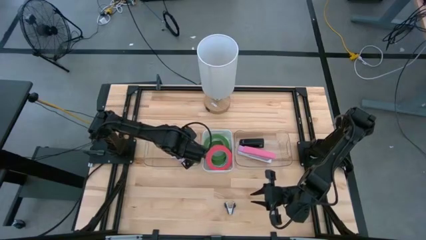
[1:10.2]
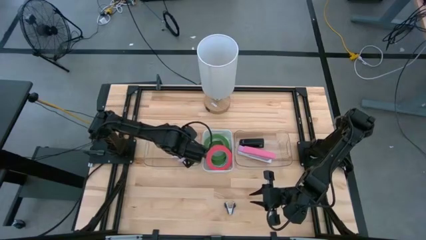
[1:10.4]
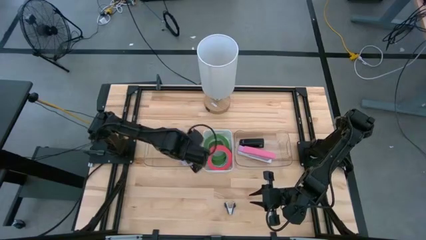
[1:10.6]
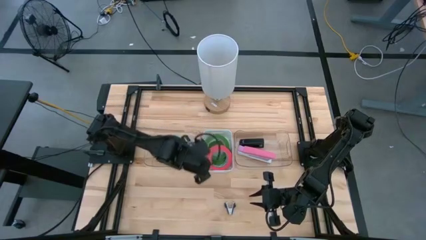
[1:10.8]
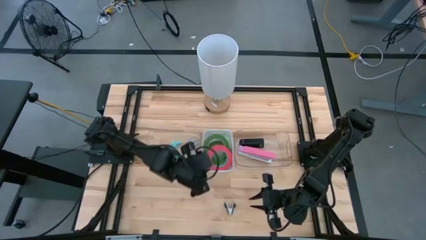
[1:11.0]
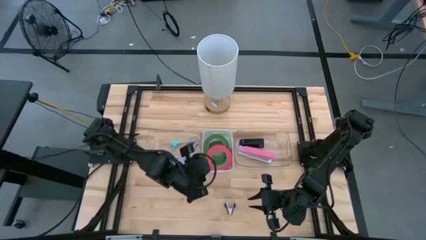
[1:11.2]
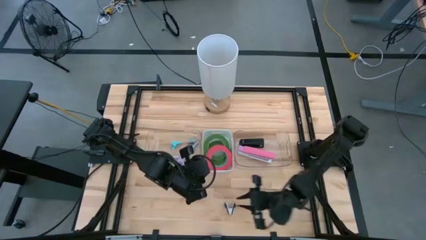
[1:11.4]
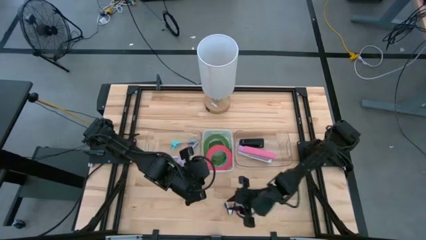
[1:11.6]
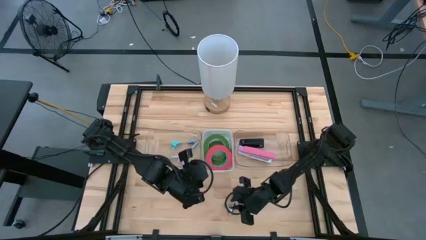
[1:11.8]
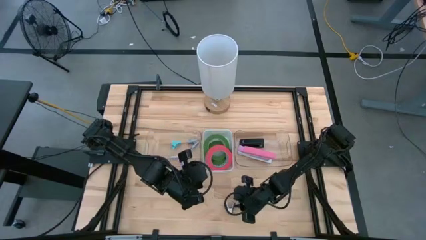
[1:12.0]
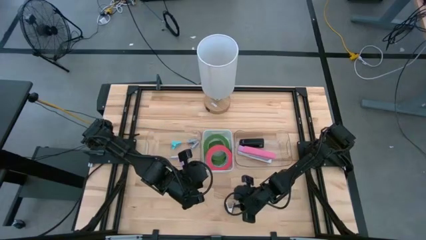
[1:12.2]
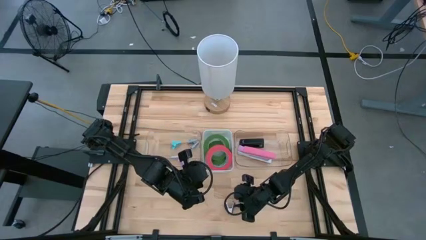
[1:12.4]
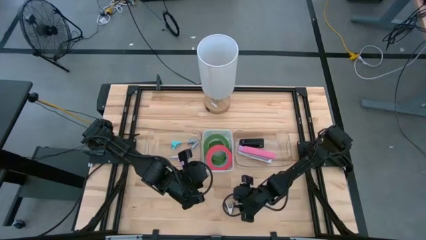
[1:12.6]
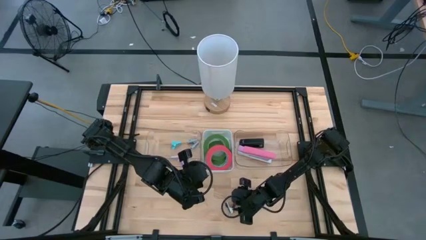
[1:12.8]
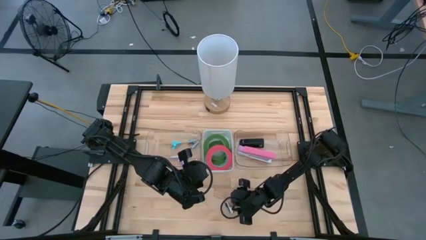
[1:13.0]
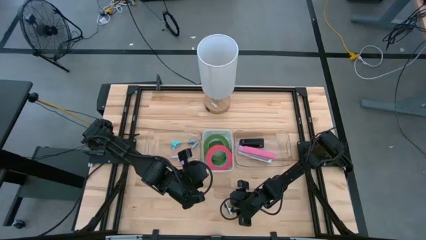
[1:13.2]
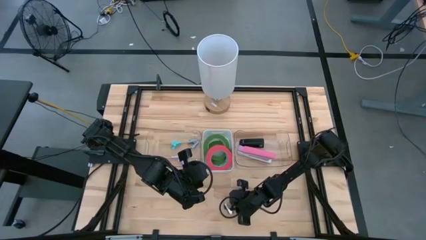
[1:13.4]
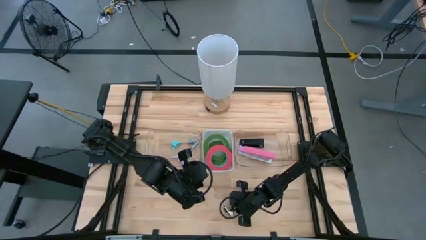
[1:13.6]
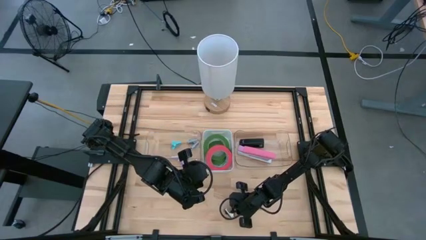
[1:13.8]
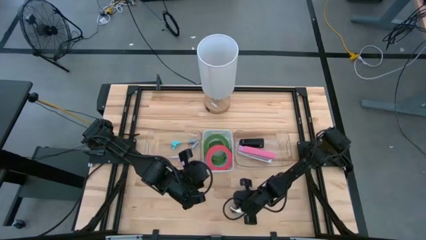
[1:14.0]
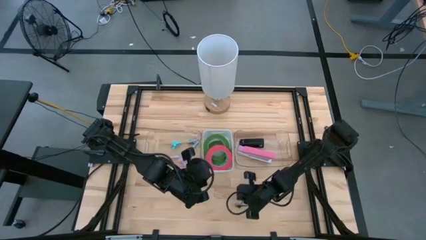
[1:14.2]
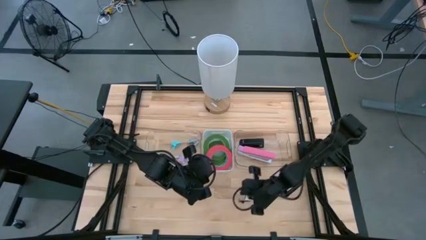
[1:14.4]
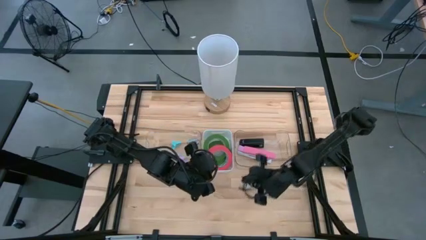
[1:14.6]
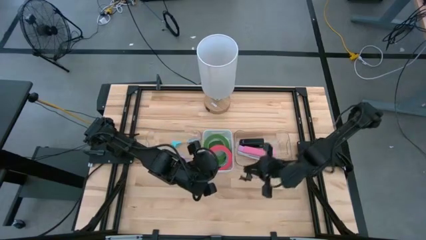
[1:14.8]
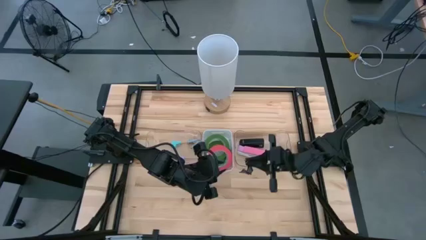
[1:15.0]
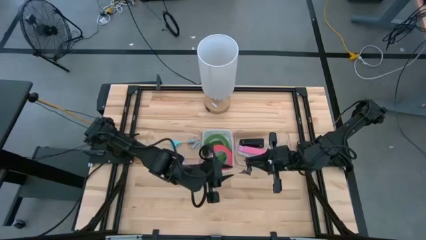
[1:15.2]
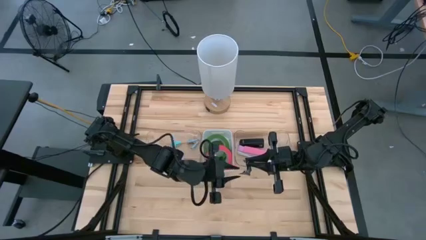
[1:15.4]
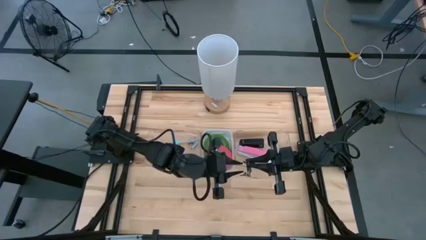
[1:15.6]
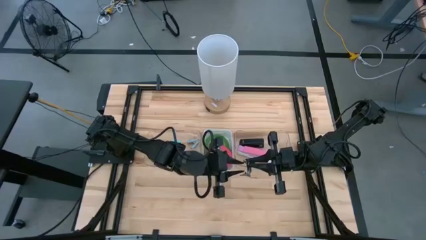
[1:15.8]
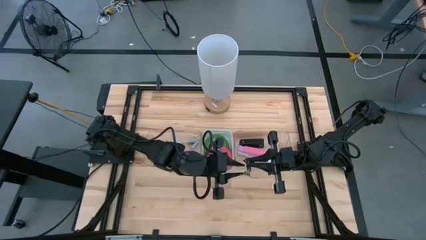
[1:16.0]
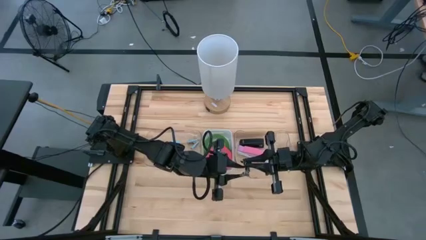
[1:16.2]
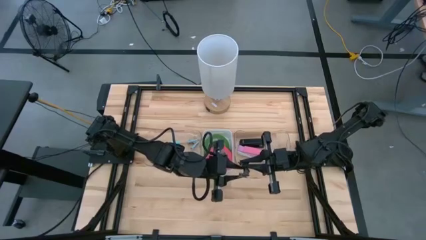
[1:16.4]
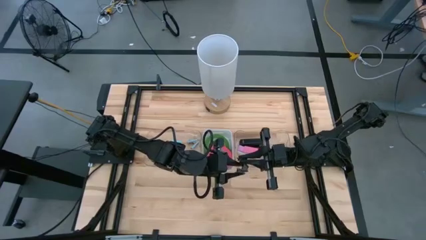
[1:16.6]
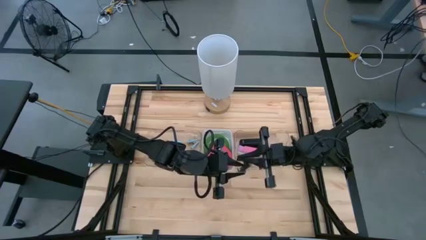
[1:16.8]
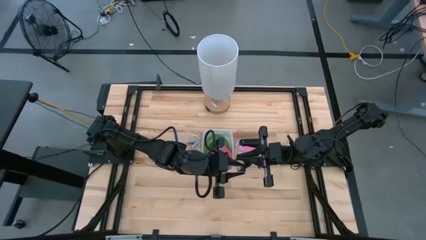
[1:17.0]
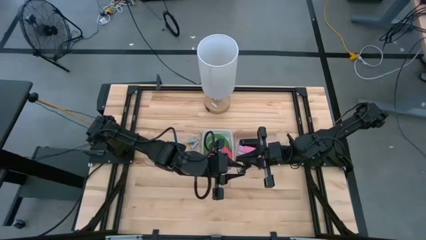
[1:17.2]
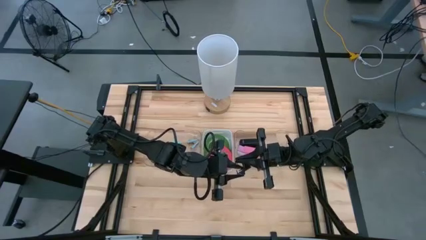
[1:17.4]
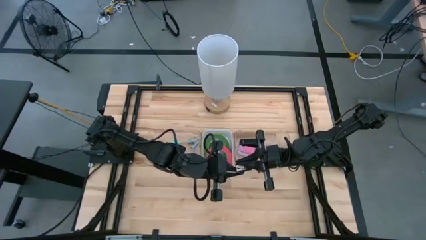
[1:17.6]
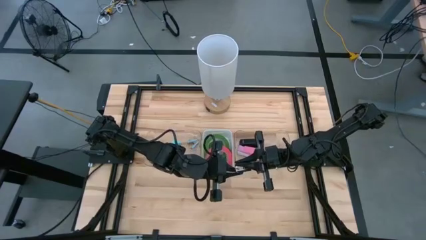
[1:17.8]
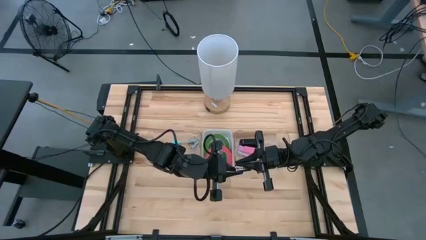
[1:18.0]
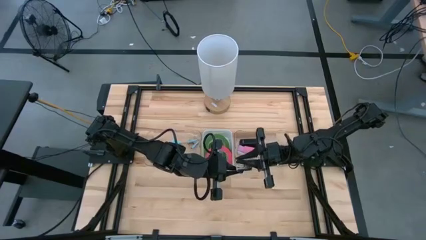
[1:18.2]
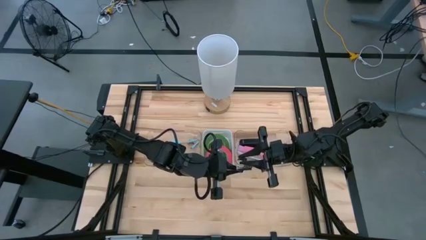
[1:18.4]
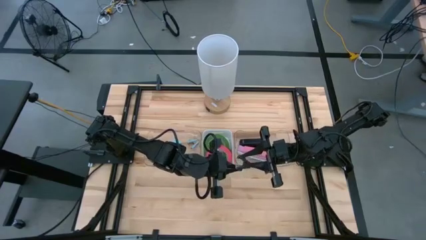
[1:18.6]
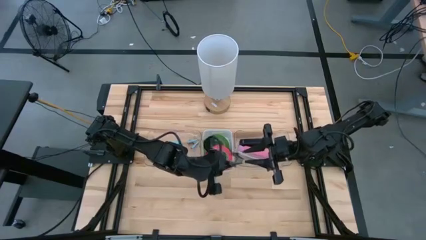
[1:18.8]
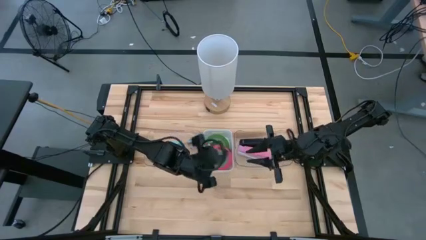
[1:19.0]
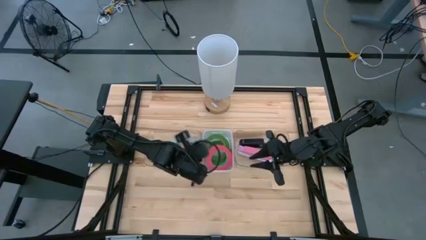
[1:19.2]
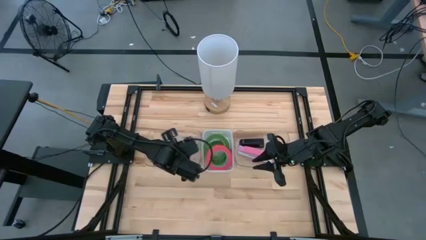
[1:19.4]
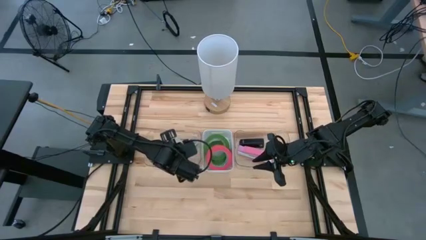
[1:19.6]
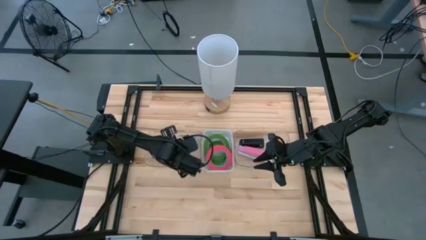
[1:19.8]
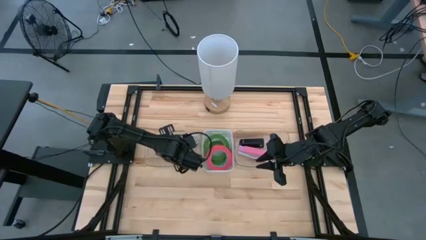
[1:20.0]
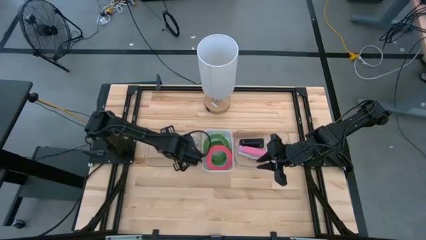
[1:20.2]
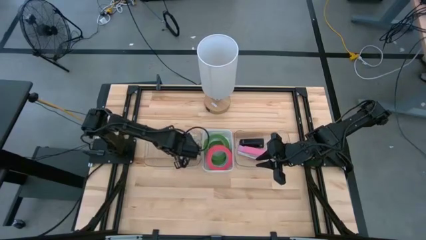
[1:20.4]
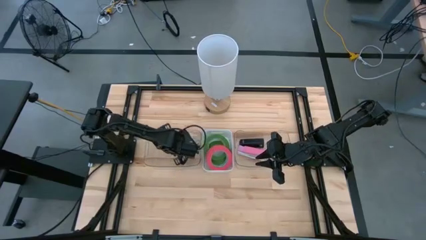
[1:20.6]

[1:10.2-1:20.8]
Task: Pick and place Stapler, Stapler remover, tape
Put the black staple remover into the left transparent bin

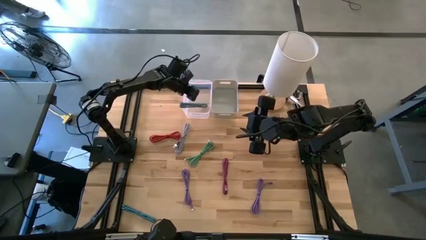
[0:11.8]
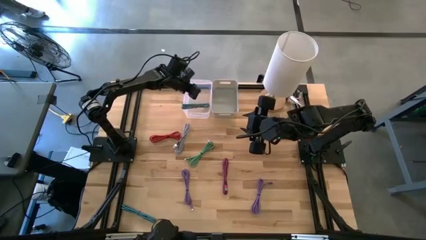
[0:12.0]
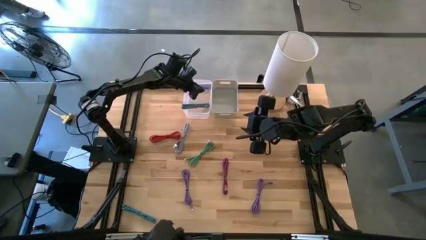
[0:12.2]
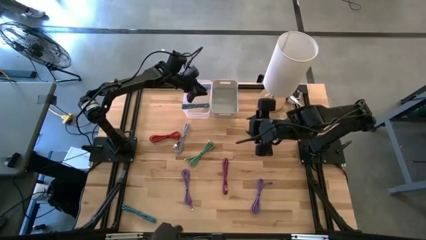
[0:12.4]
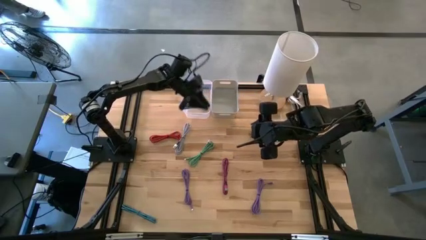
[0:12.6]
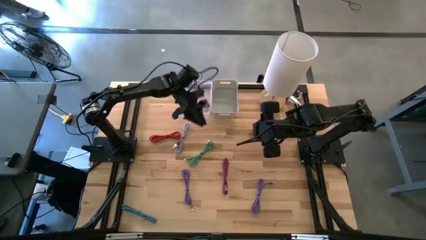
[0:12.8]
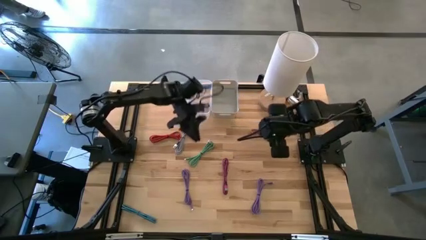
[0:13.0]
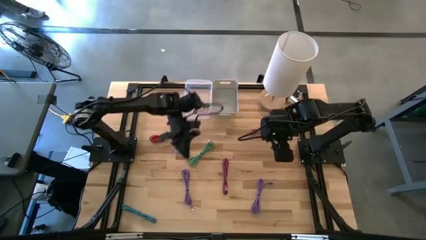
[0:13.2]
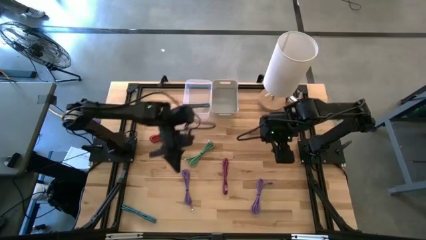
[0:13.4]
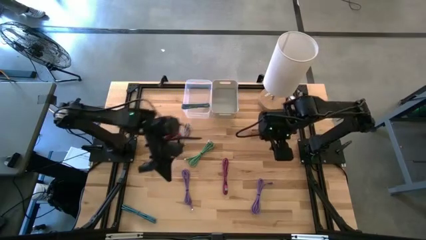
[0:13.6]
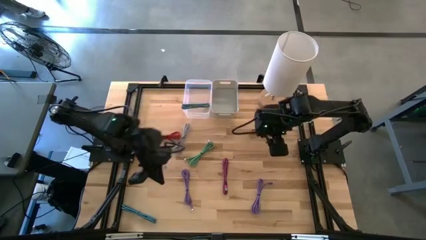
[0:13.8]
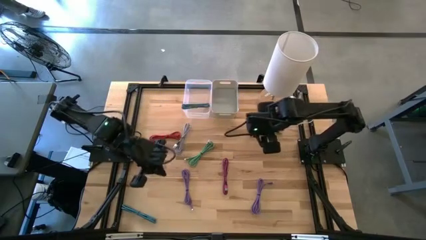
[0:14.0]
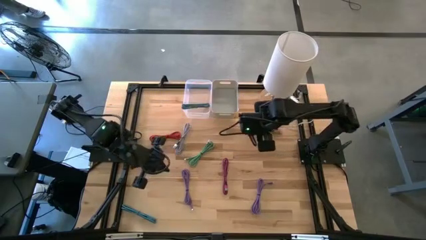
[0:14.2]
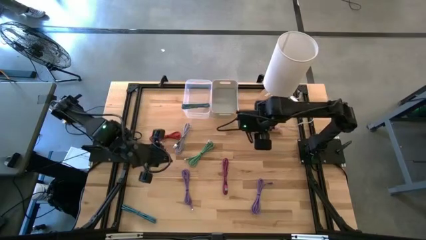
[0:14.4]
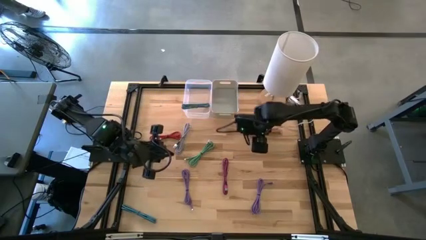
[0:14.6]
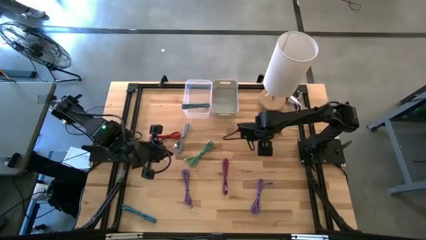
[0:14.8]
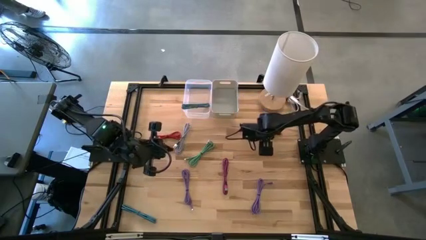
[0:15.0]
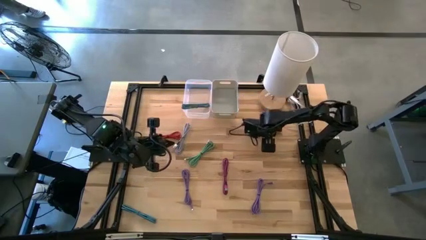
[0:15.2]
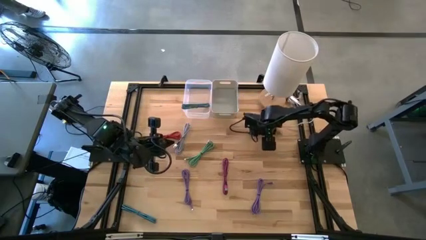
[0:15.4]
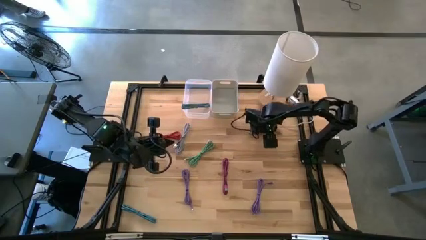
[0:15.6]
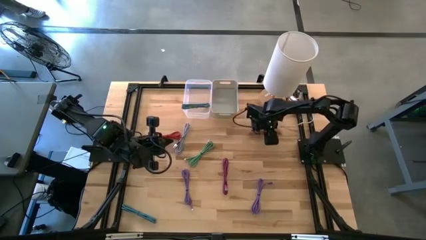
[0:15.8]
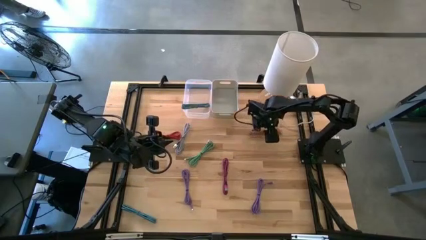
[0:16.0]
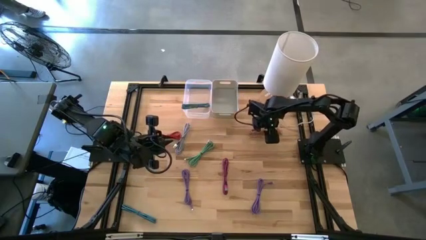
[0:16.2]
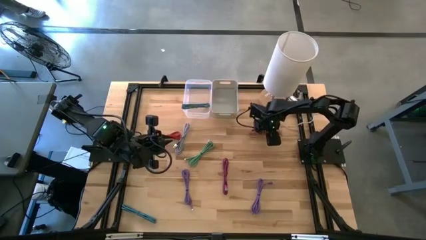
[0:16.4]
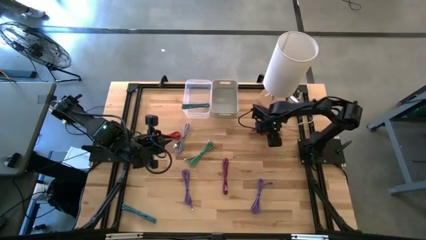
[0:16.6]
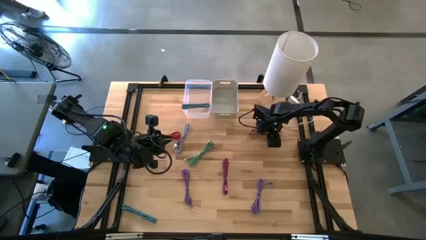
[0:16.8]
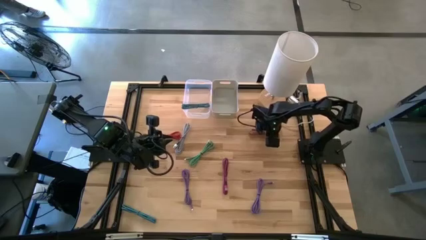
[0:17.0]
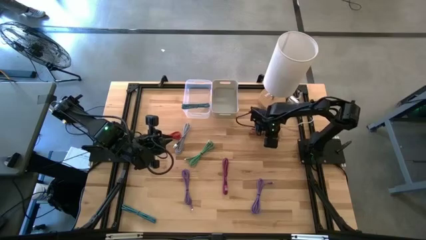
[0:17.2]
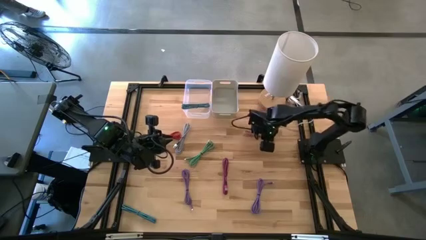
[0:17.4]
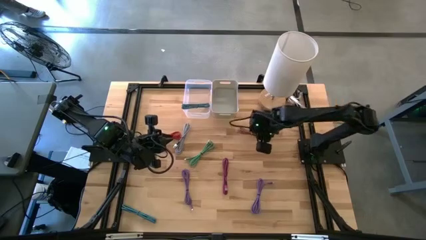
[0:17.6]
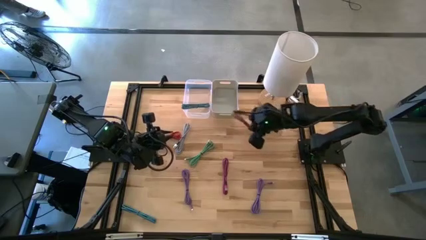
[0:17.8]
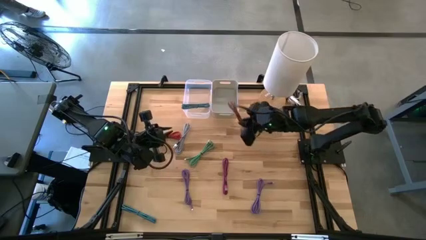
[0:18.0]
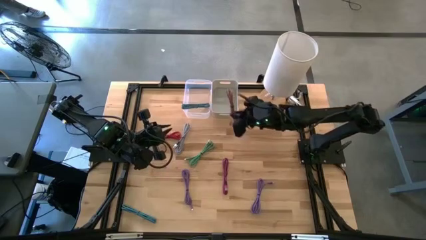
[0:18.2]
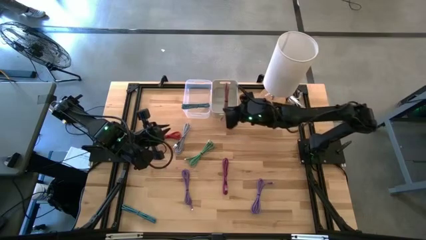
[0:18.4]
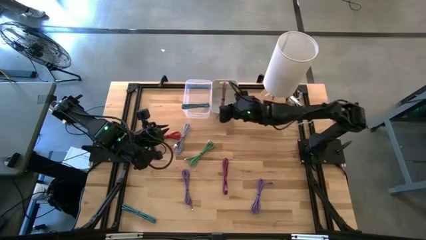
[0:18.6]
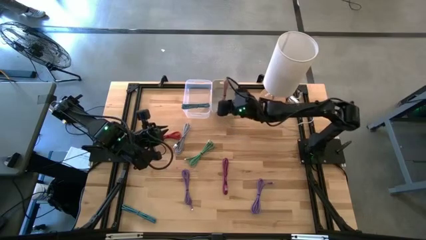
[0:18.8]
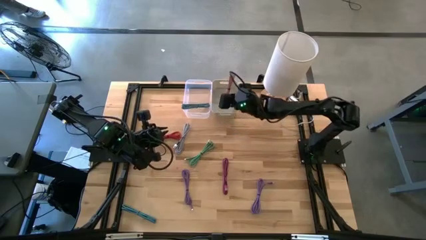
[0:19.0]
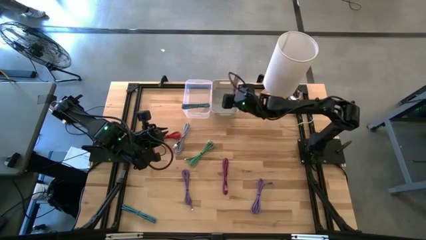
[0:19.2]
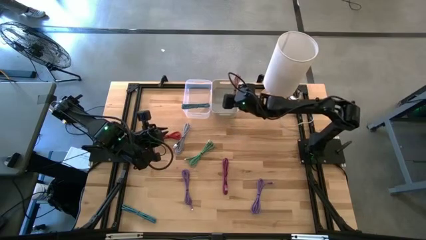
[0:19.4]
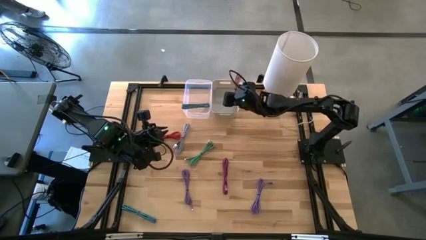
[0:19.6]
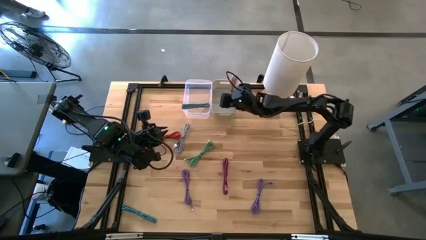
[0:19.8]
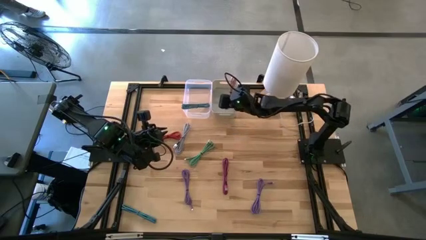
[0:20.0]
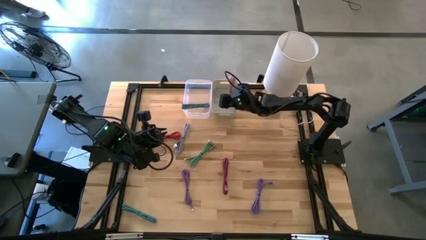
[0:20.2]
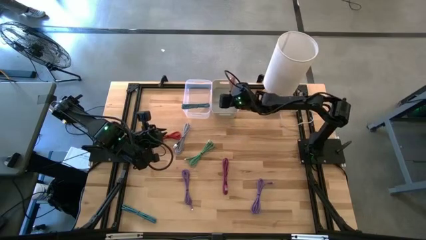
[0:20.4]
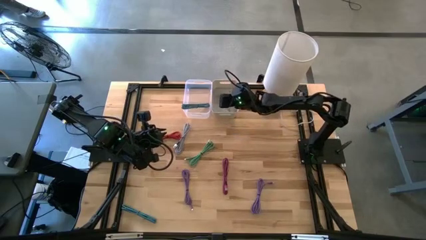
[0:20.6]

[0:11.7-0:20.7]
Task: Pick & Place USB Port
Put the pink charger cable into the gray bin
